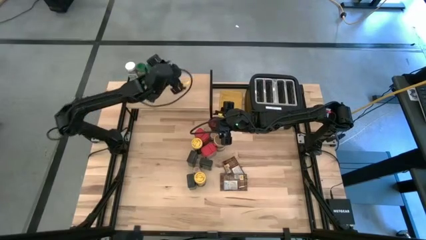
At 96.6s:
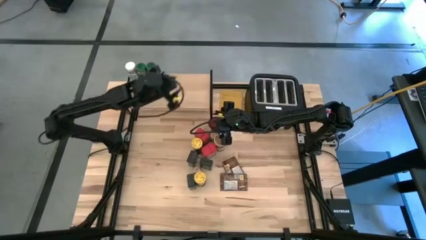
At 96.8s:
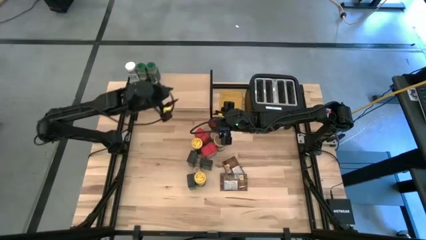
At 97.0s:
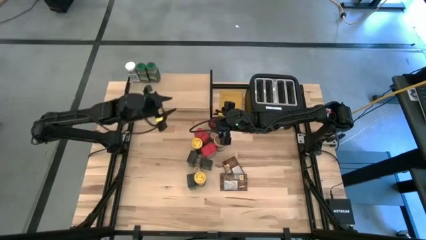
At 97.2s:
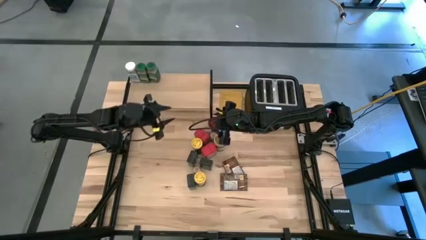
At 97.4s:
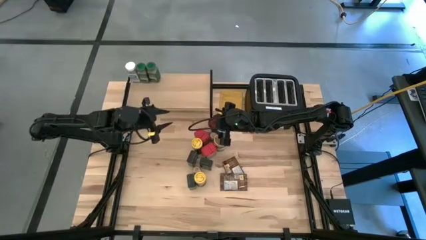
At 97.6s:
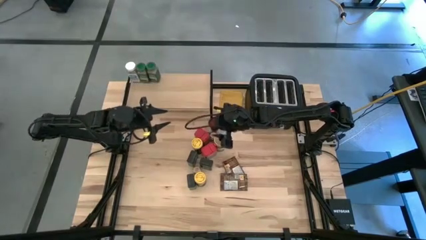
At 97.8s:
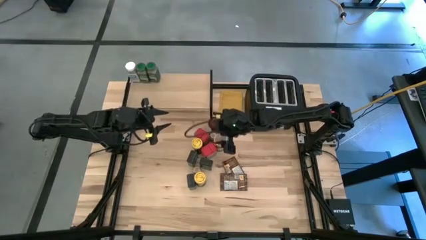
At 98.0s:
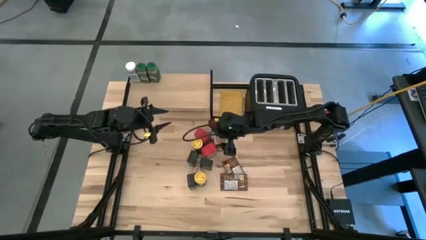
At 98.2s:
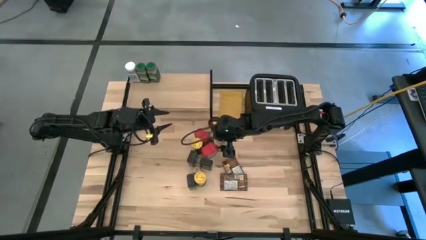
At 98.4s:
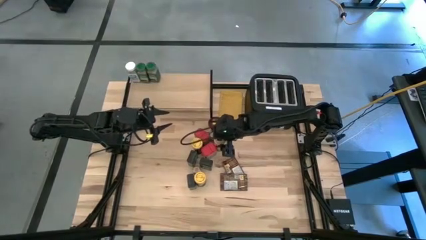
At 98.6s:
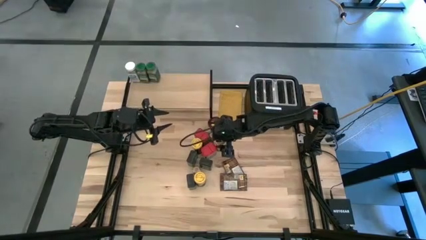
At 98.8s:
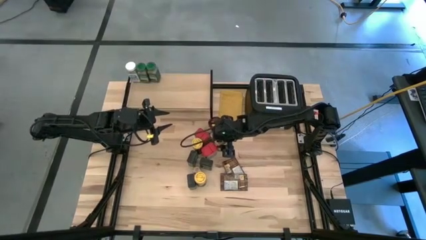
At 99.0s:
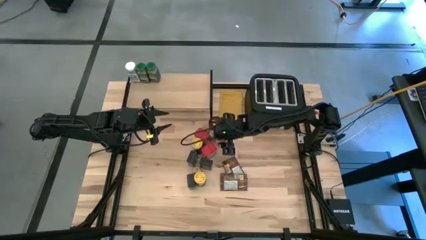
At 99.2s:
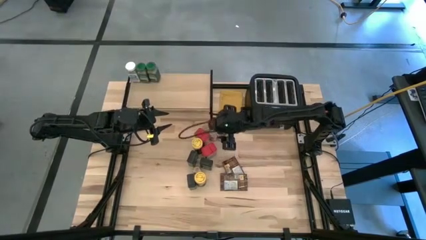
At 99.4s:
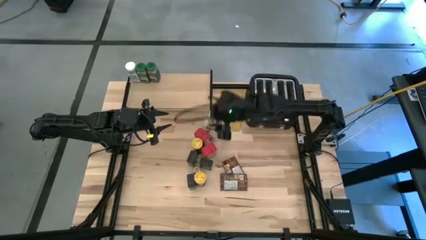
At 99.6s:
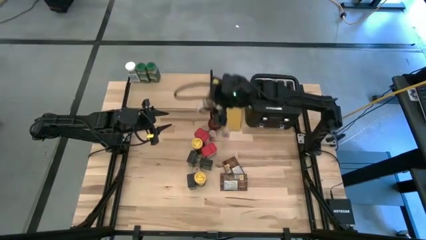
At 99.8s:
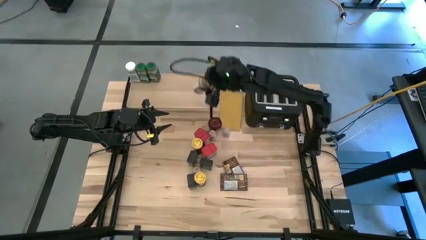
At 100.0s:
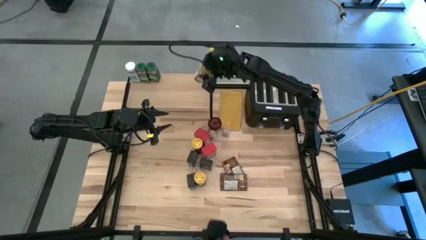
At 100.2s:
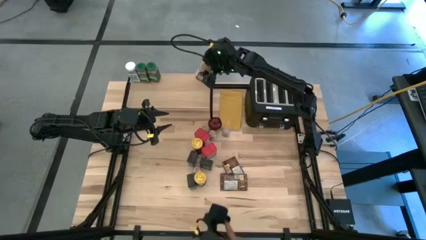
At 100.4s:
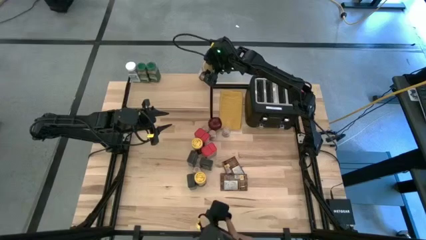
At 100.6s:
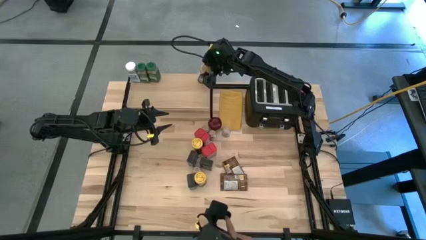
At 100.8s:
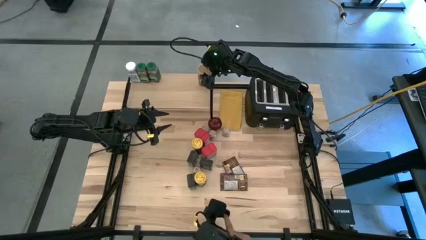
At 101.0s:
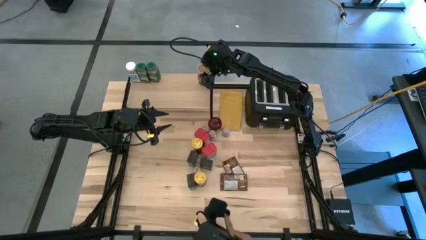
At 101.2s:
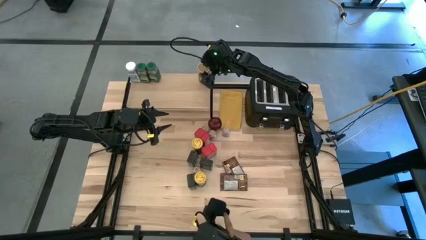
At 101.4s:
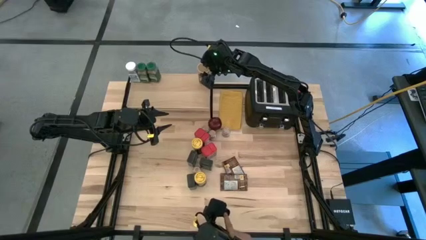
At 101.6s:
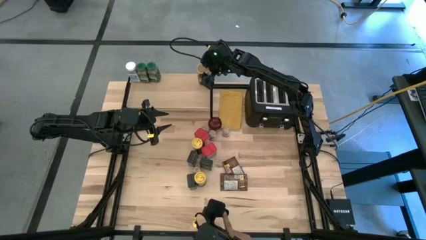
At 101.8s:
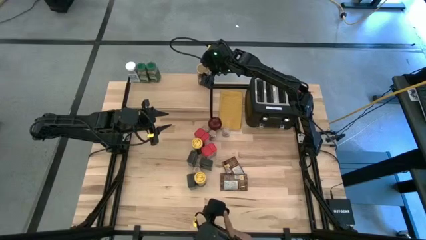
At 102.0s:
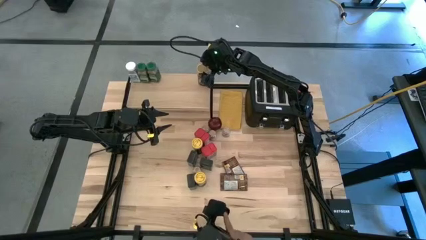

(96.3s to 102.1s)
Task: Shelf spices
Put the gold seasoning bottle on the shelf

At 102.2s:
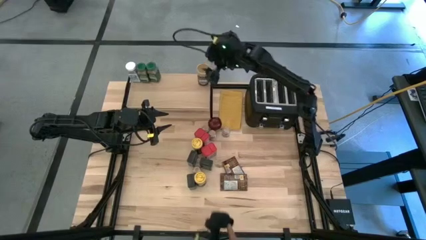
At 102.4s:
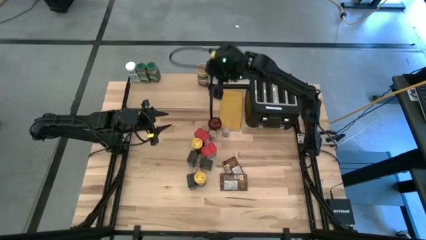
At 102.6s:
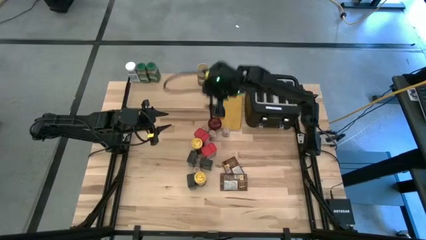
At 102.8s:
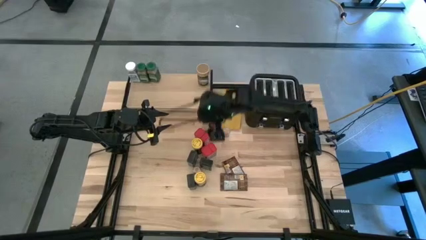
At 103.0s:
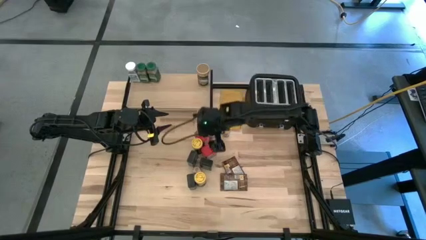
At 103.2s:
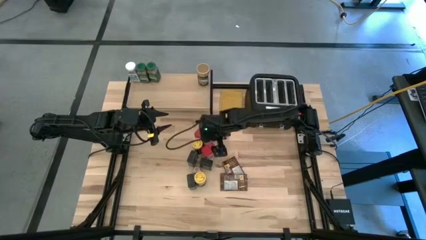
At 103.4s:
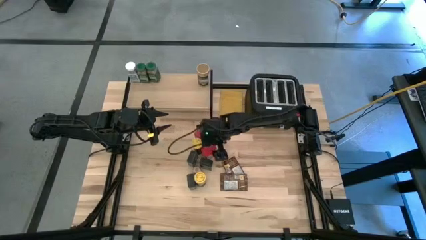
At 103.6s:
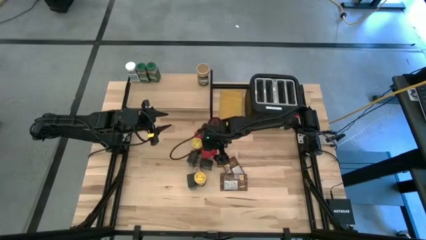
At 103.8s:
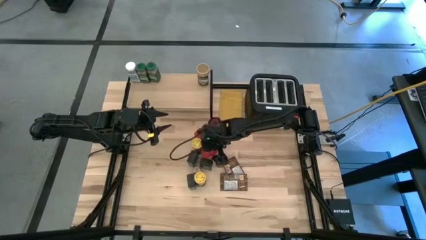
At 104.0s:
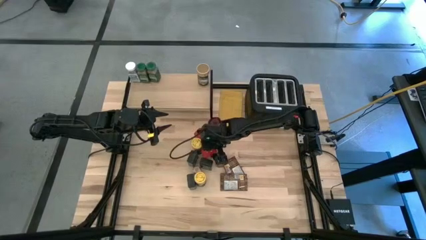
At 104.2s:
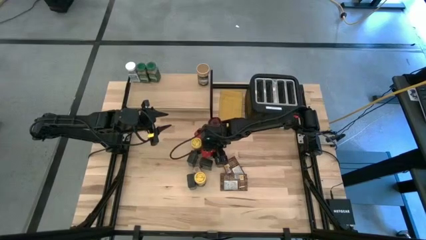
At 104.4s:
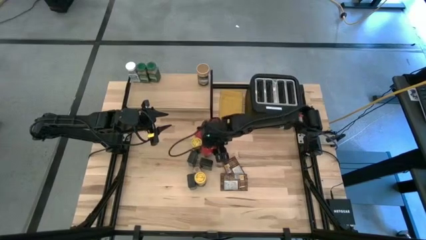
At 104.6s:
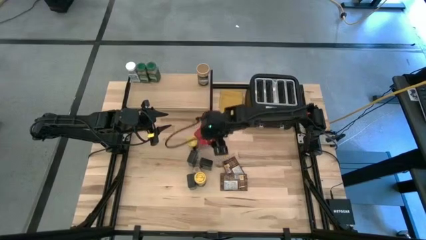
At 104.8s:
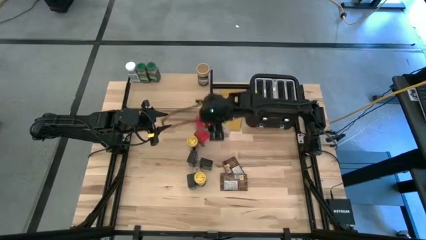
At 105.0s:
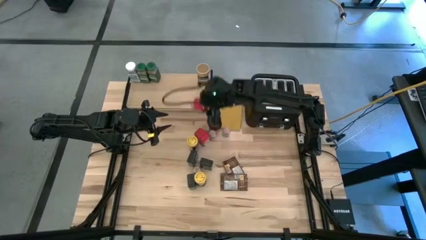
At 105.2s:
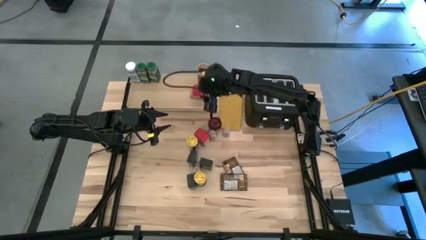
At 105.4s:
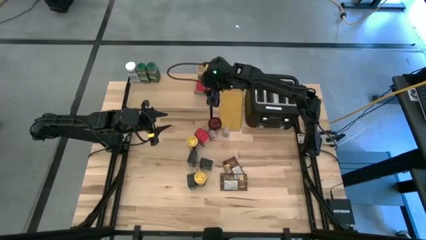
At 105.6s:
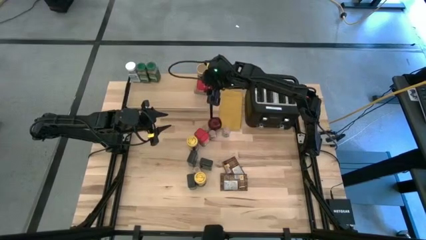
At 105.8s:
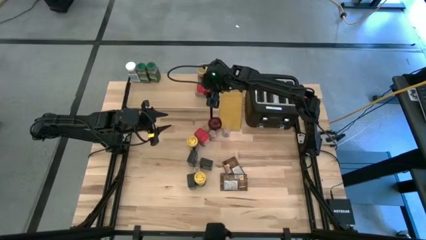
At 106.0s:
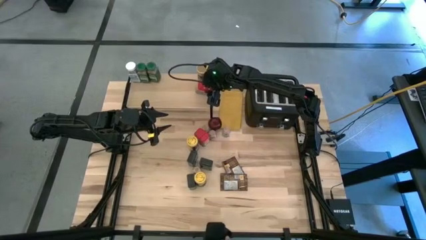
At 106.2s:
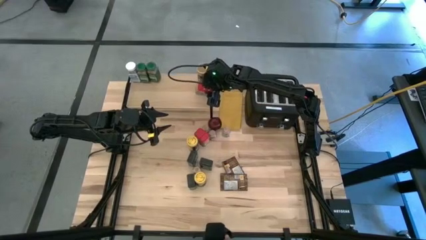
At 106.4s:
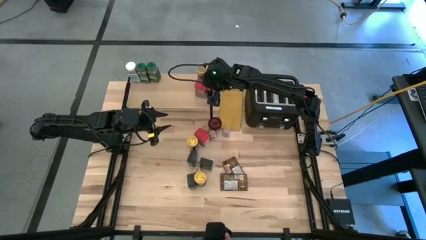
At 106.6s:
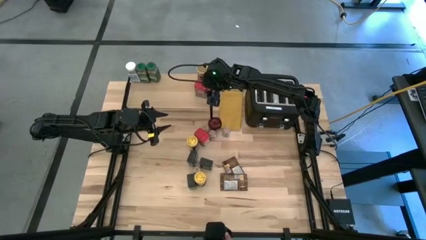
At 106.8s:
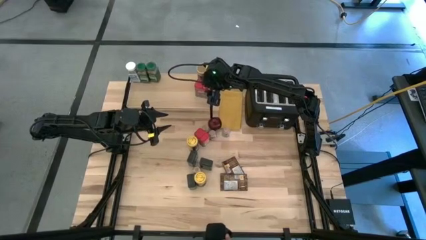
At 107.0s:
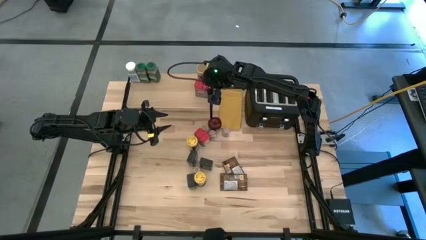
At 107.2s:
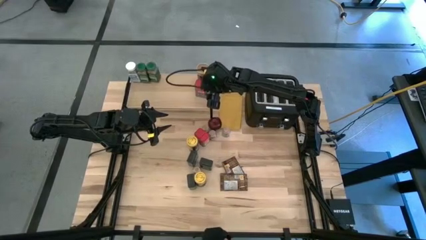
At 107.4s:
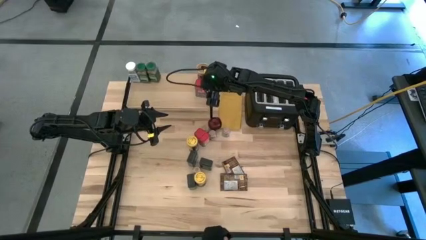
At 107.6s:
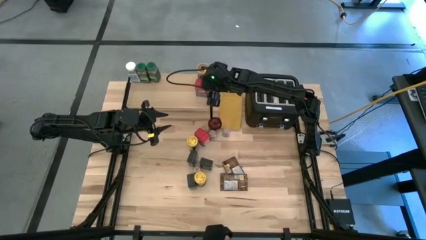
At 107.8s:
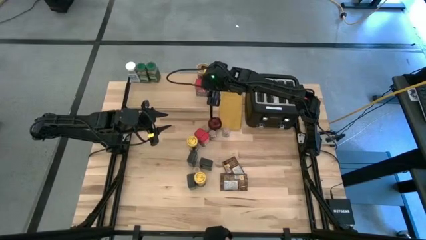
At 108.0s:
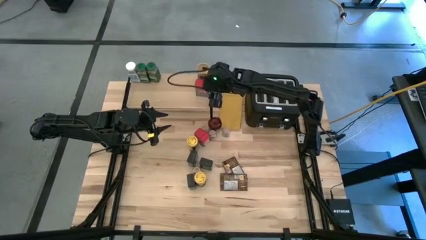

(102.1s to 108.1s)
Put the bottom red seasoning can on the shelf

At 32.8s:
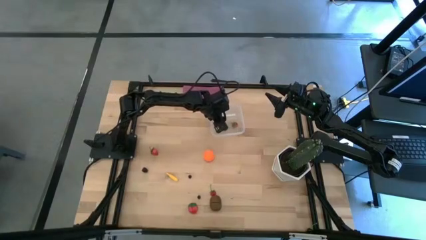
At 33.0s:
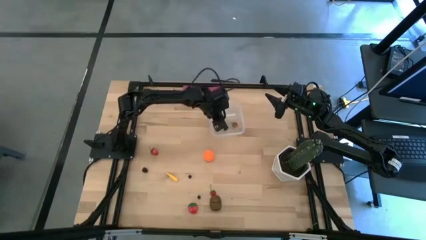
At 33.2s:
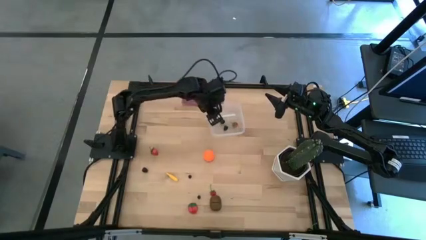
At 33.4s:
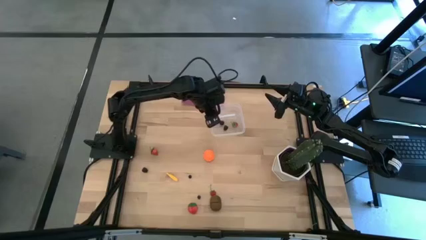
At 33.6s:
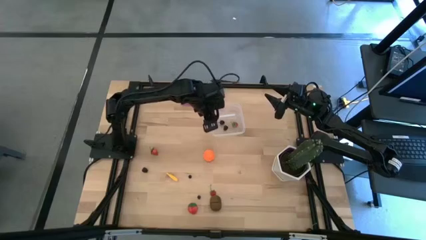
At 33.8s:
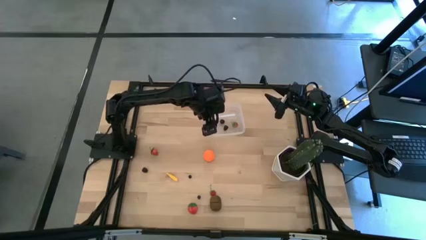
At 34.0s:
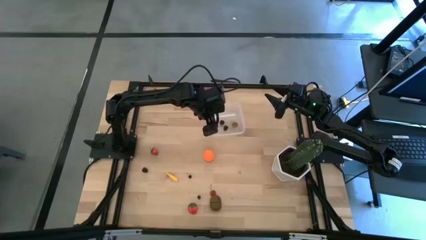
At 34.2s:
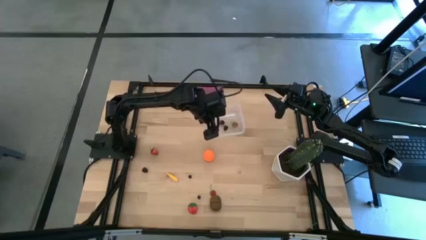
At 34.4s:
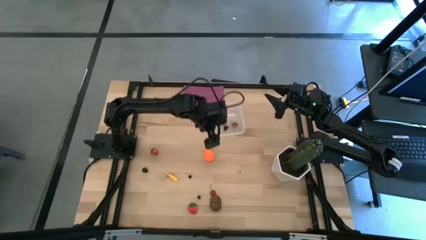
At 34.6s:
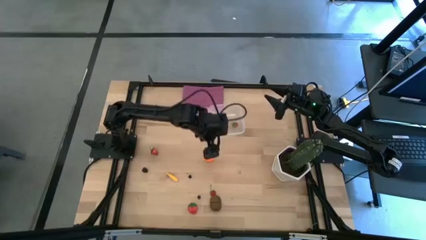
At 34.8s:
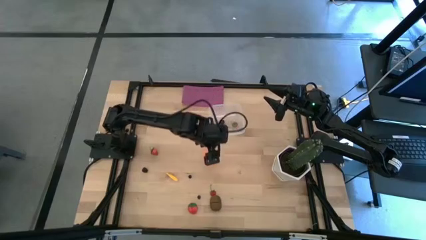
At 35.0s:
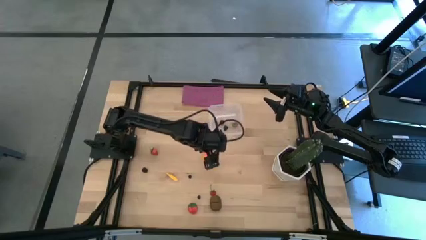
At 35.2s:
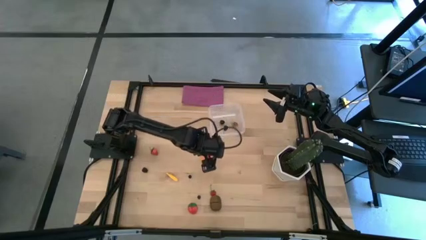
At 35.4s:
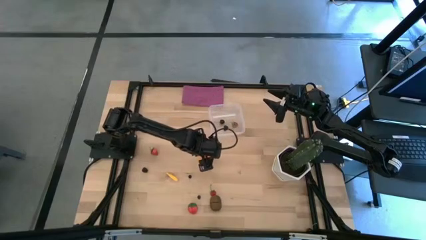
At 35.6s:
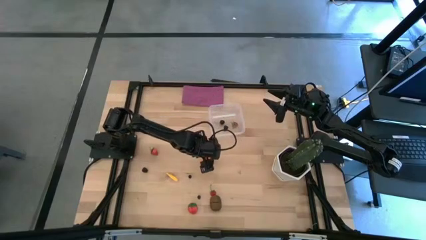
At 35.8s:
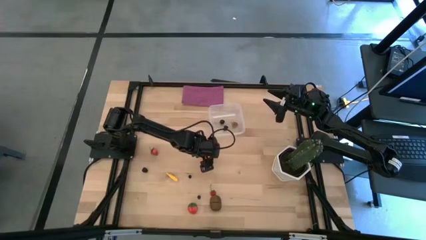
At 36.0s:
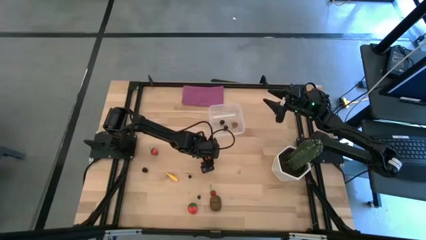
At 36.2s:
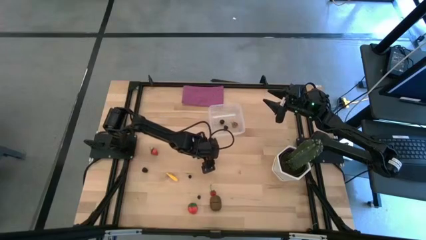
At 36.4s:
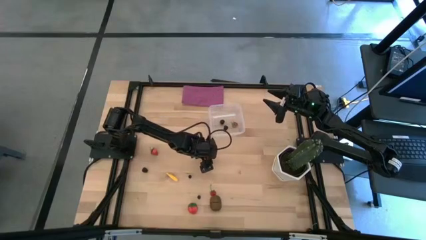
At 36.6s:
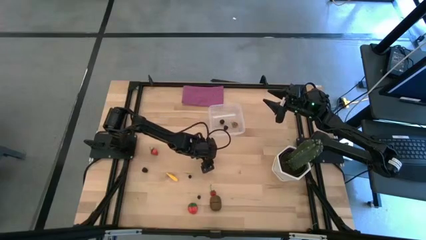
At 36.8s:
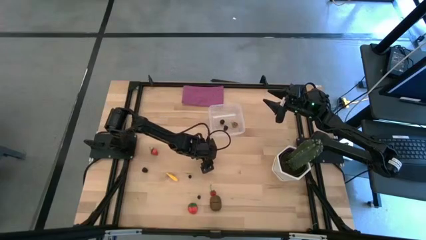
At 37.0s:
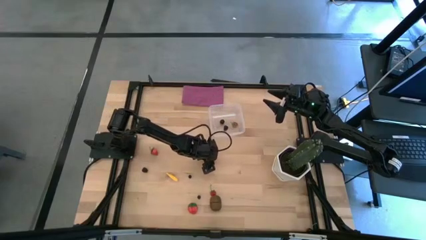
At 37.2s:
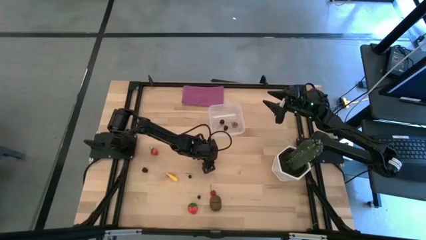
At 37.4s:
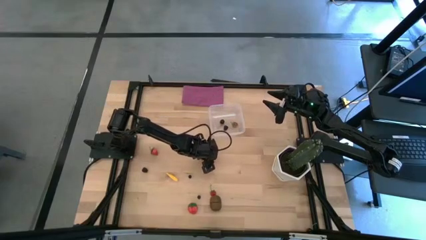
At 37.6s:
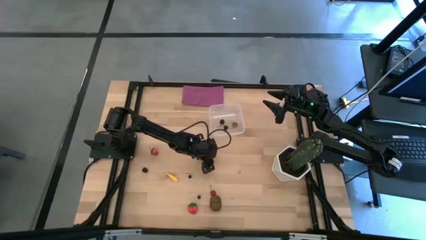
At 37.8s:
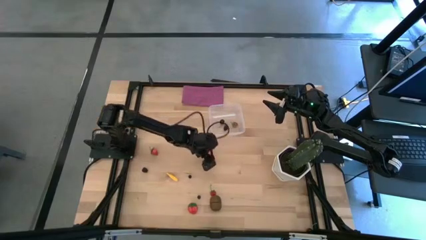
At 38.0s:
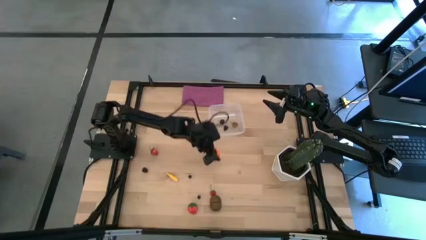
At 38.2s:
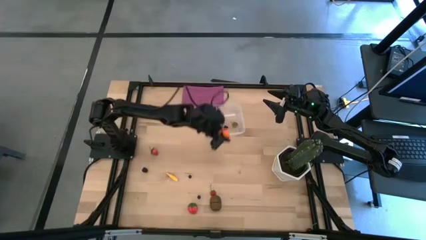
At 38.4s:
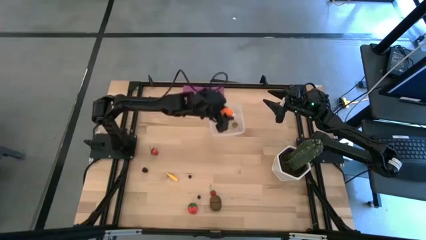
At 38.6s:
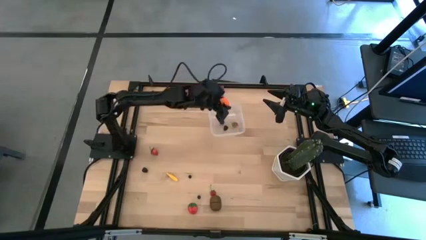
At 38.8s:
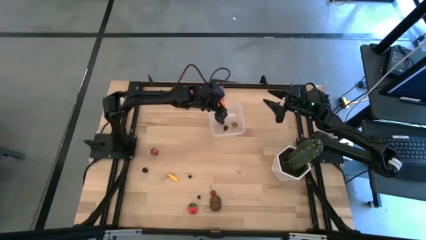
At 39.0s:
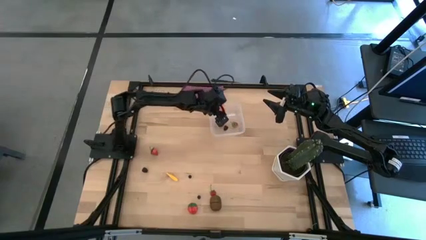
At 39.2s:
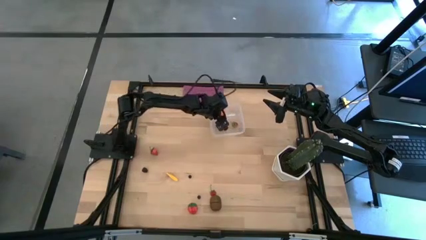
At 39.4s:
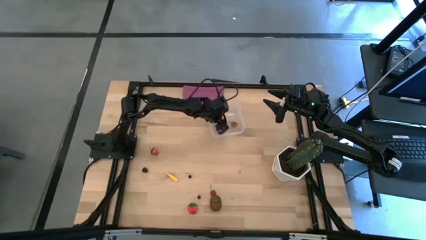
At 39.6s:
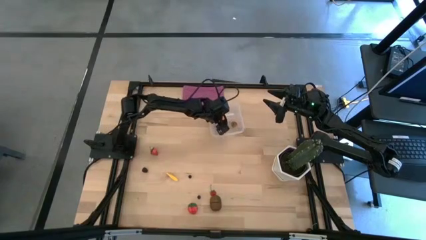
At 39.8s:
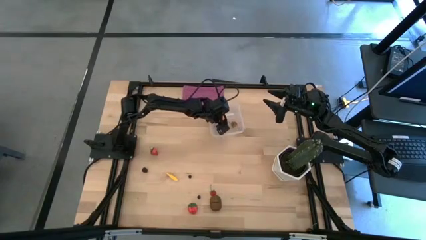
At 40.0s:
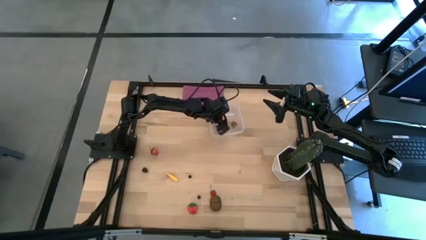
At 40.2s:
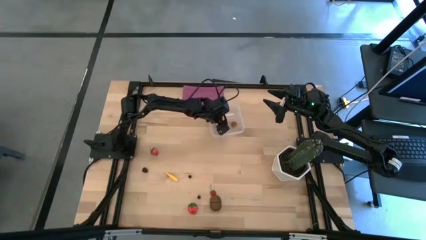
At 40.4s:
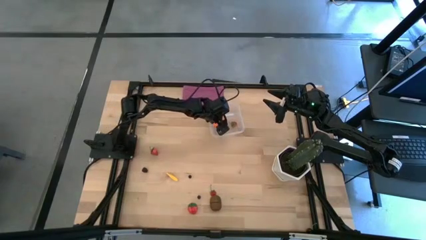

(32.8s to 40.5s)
Task: Pick and placing Produce into tupperware
Put the orange into the transparent bin
